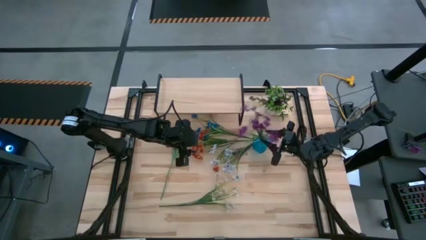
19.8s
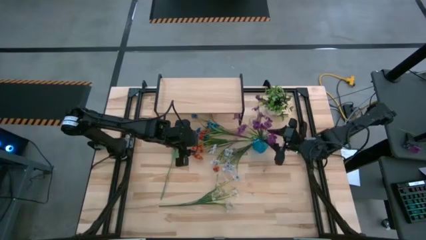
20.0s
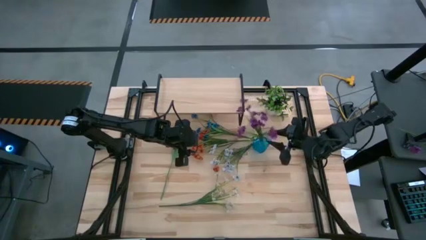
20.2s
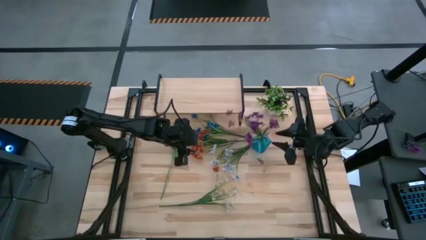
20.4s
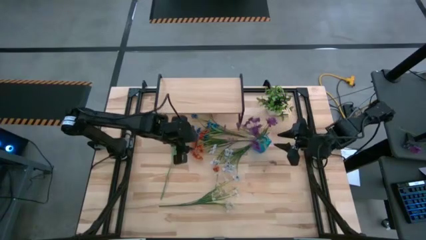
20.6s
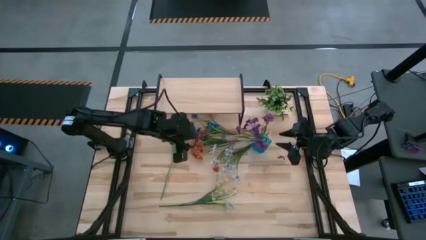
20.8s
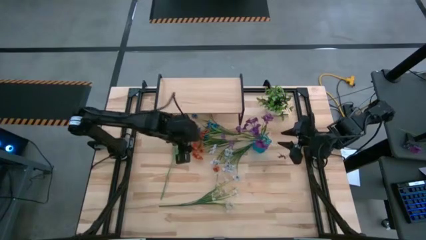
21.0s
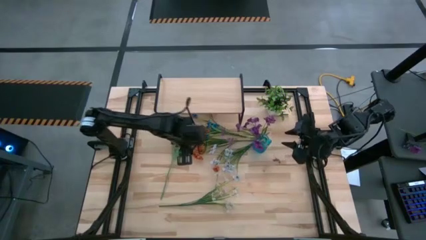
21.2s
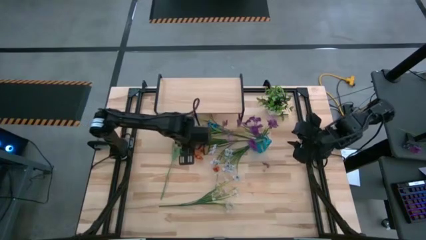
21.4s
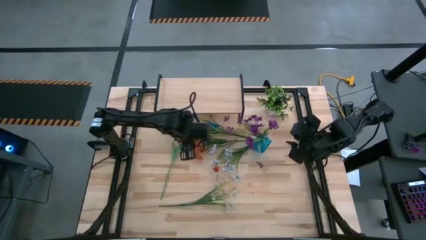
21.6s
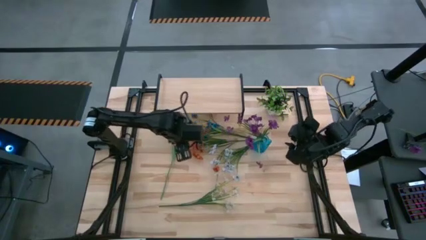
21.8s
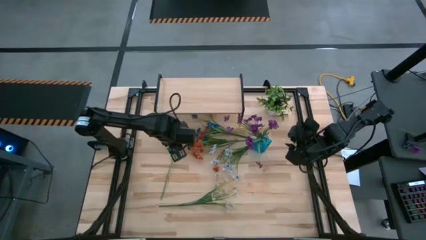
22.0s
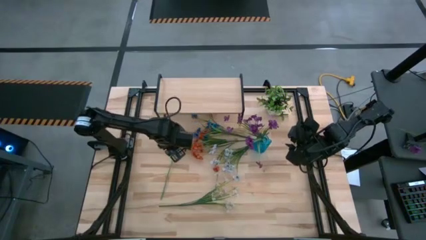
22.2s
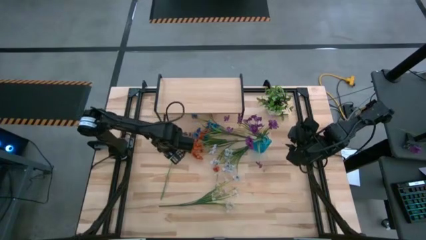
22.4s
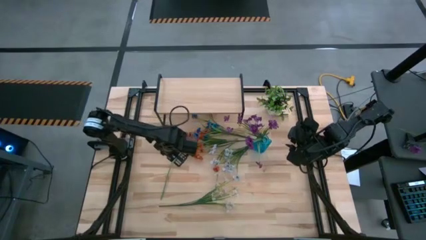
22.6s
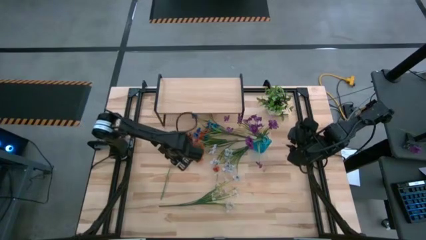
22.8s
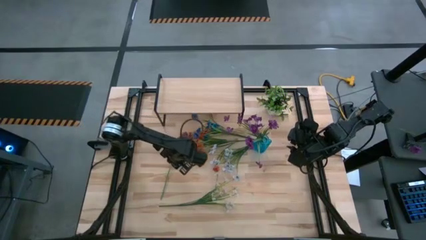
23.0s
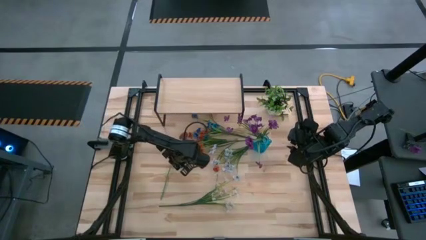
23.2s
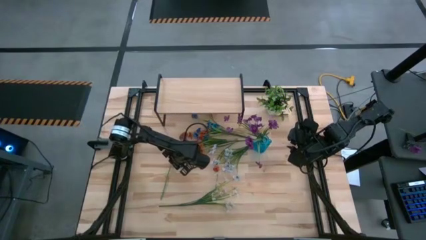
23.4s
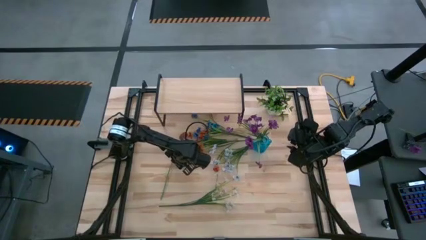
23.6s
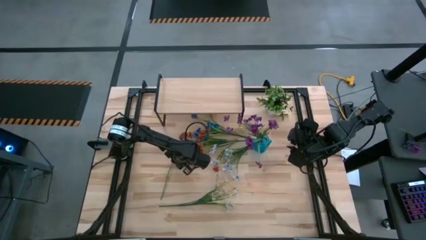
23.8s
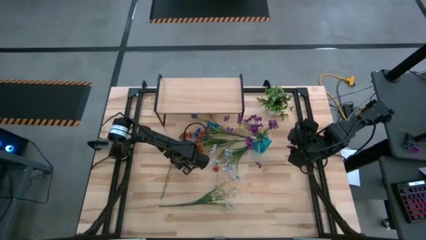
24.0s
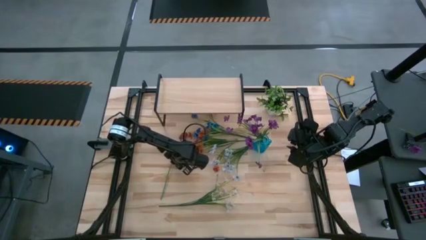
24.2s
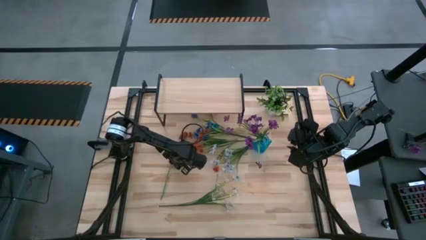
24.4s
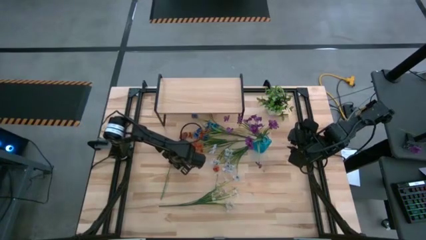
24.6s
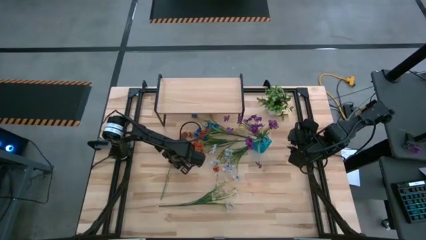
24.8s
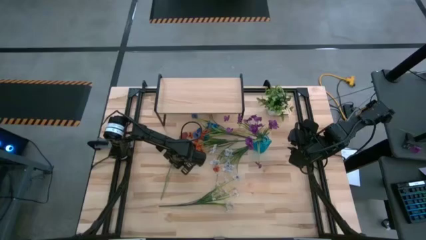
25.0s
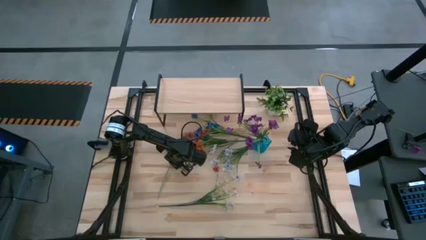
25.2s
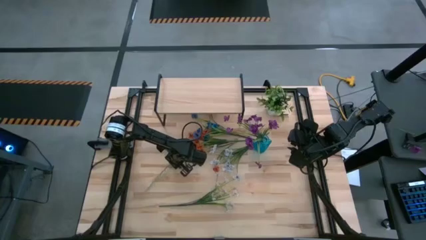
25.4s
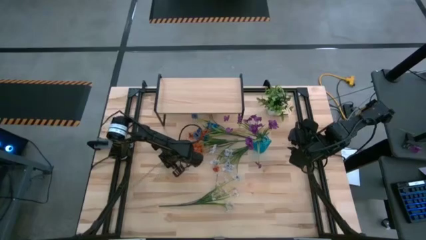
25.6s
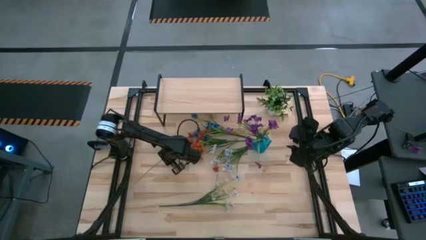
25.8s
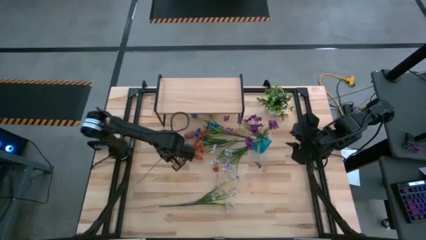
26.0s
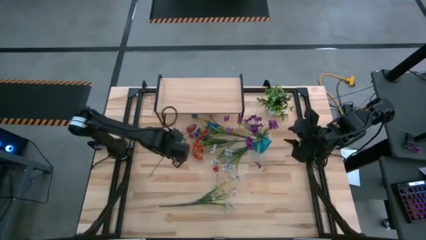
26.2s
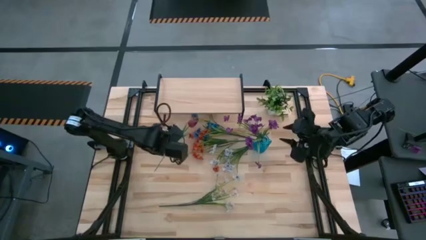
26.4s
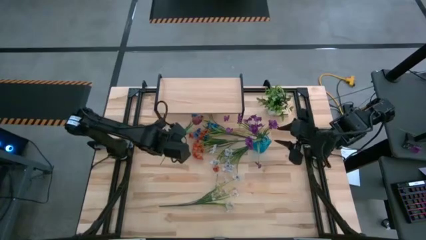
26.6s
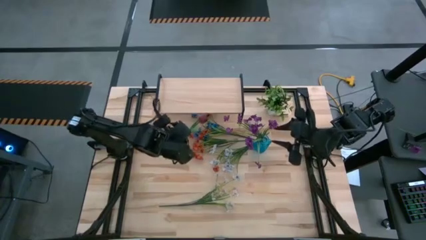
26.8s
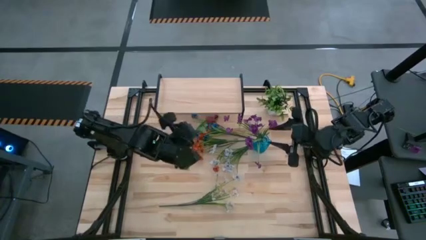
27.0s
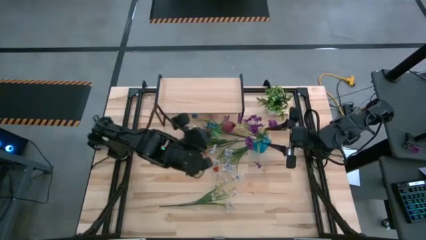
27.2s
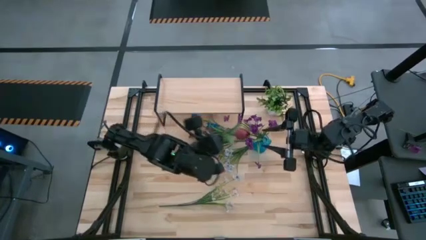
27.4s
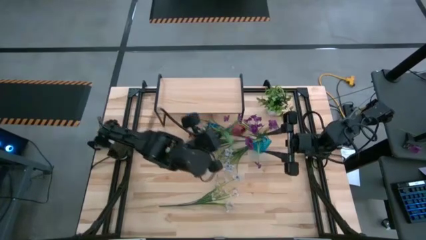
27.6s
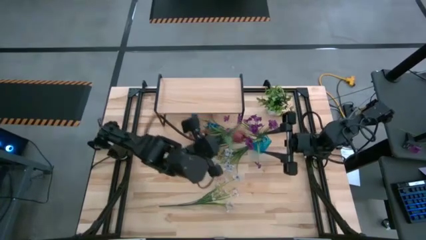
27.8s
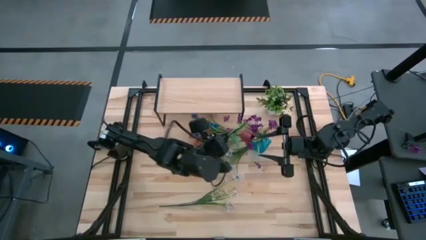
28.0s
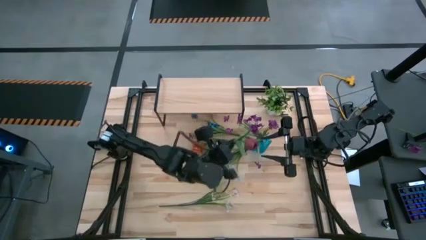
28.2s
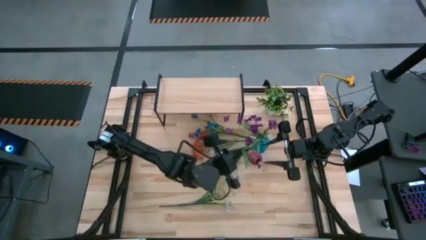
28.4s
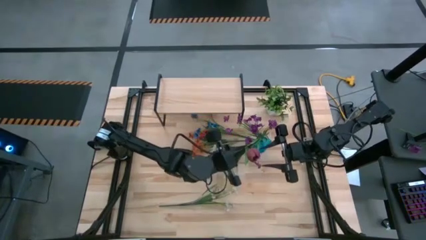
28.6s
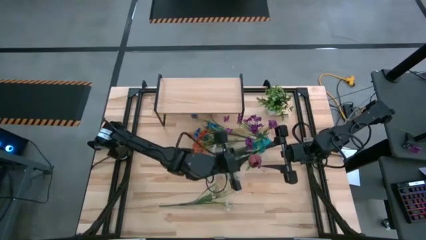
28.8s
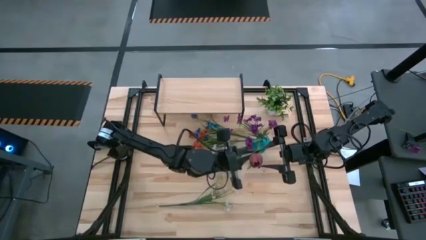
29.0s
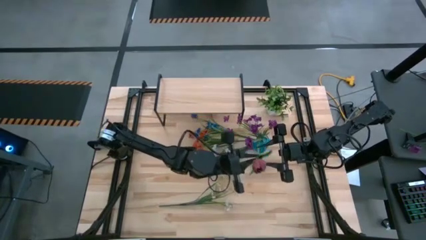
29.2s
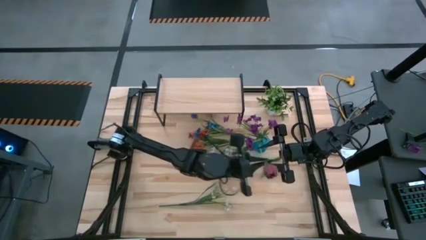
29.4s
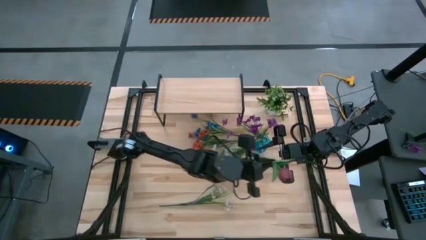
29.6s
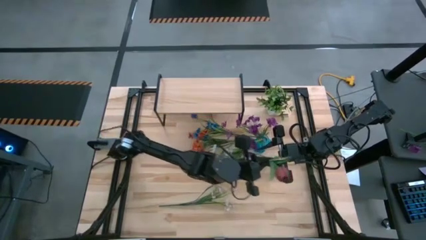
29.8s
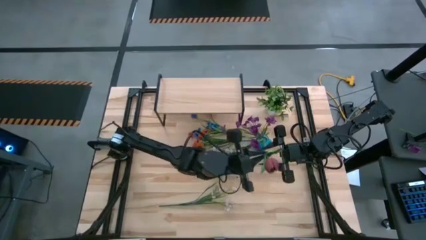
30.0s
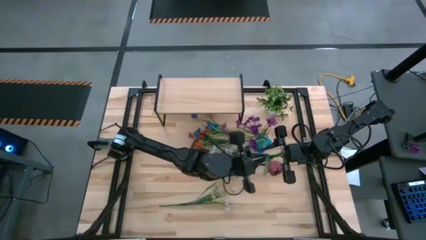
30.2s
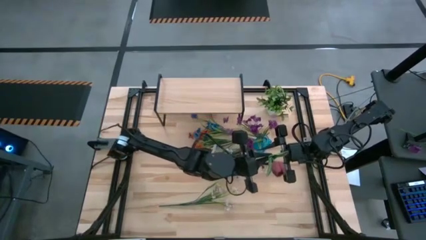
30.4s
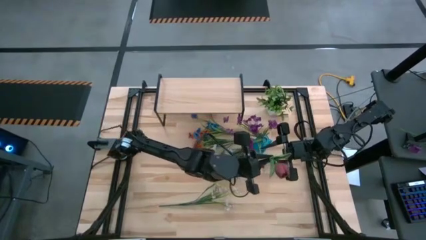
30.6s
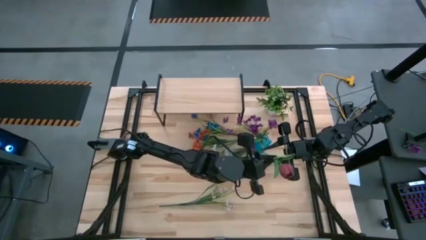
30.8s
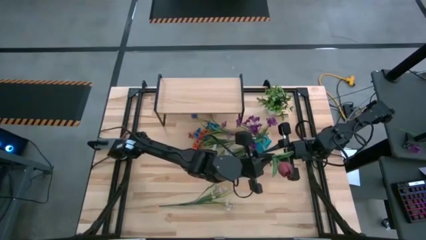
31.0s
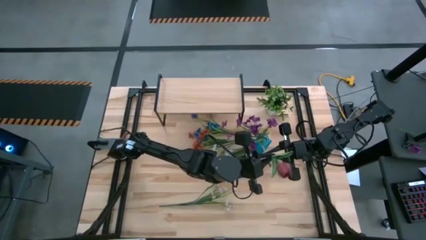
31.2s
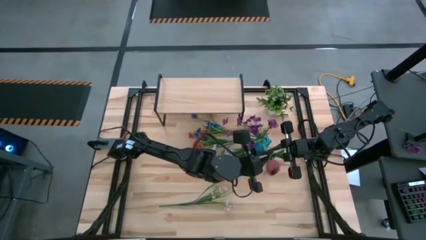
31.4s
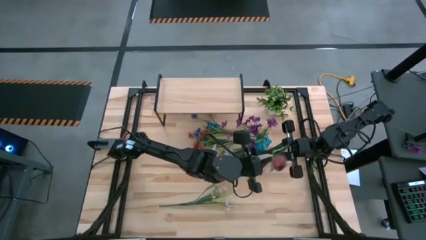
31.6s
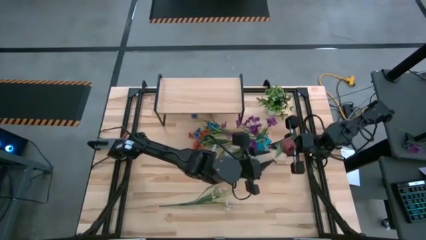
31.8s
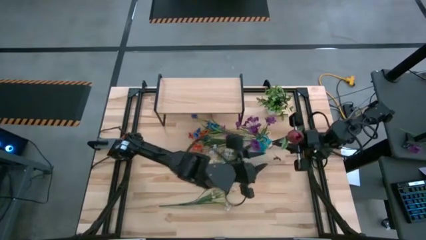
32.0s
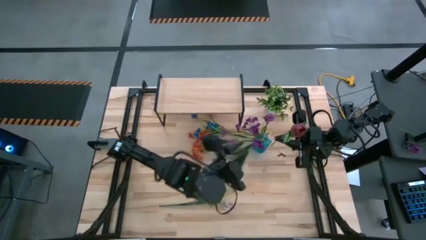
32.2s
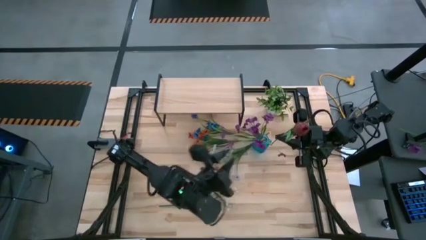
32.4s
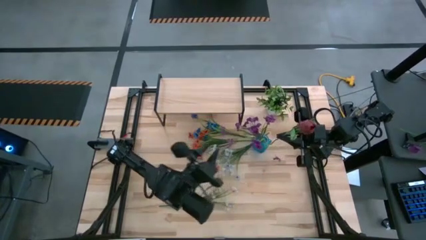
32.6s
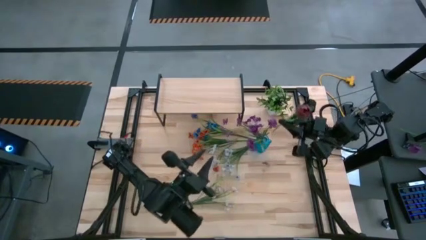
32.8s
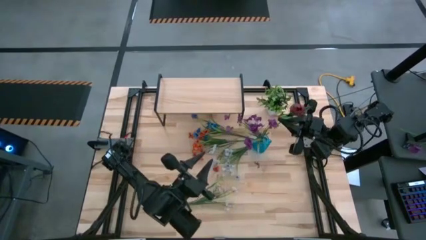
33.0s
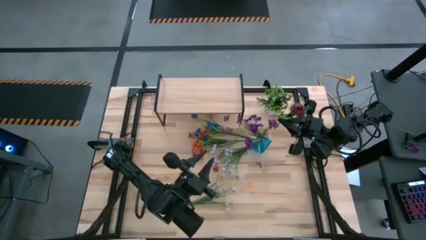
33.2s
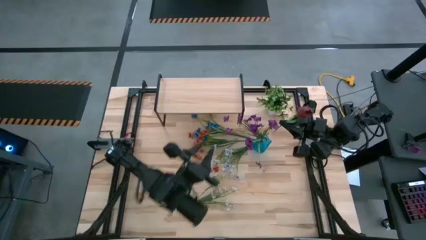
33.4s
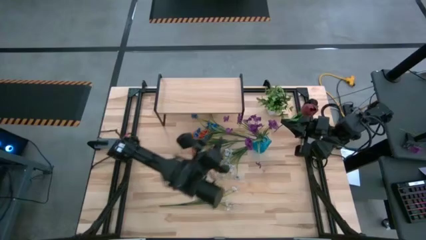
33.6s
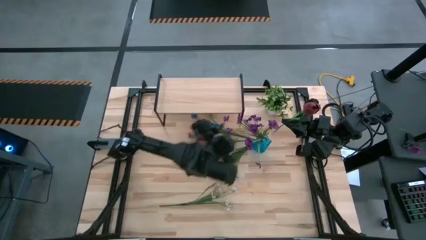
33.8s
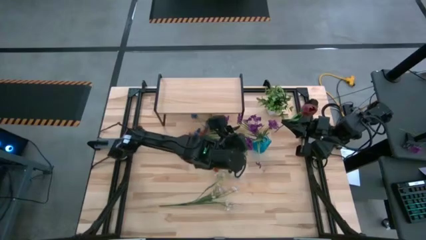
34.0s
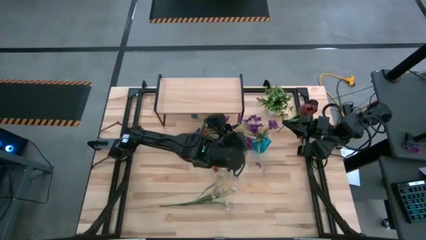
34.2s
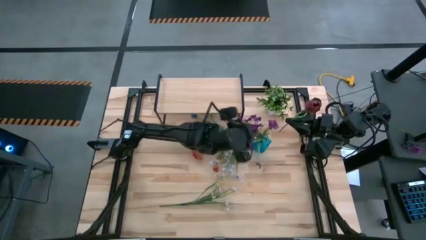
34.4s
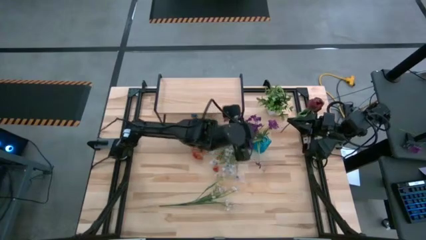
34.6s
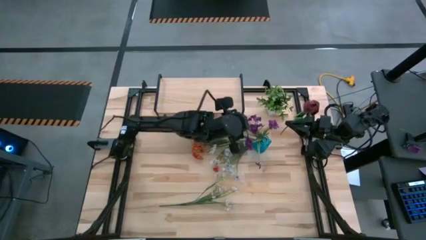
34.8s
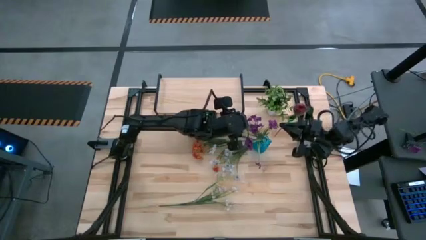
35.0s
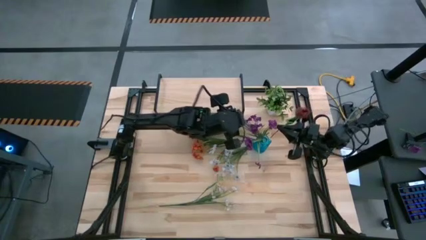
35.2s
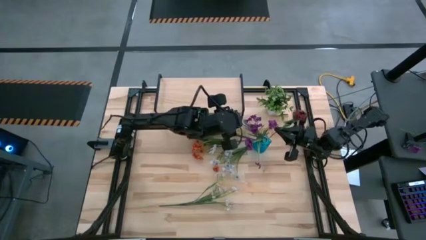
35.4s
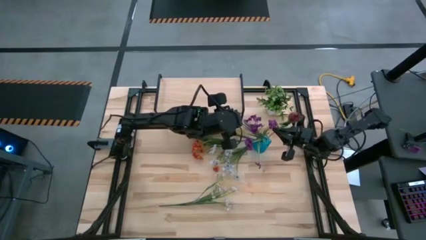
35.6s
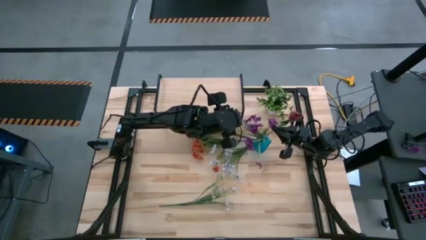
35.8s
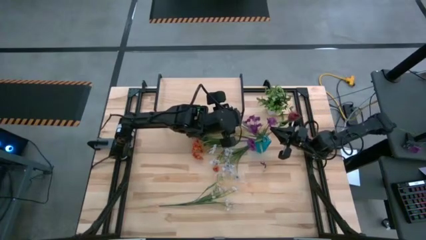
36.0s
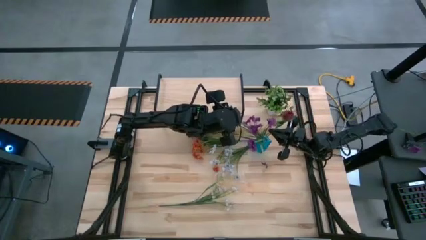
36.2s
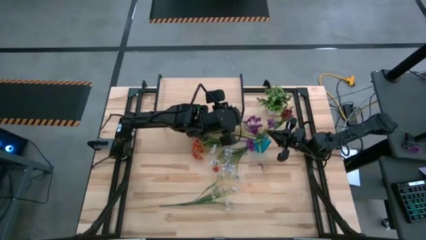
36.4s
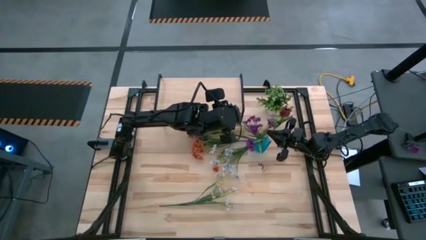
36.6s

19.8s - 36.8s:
Task: Pick and place flowers into a vace then onto a shelf
Put the red tulip into the blue flower vase
